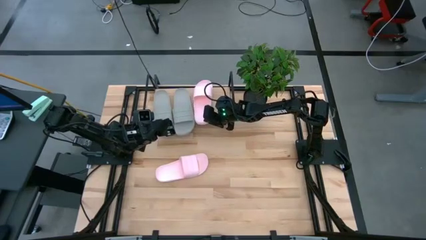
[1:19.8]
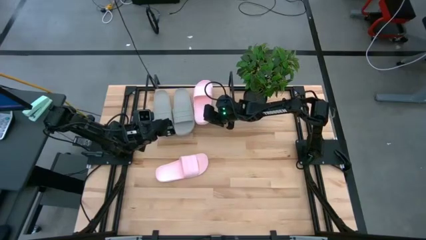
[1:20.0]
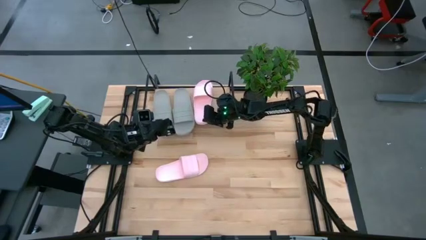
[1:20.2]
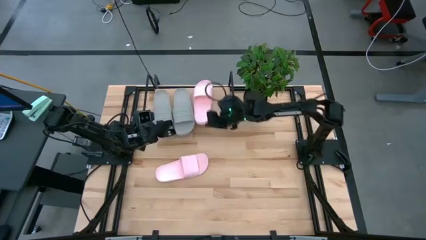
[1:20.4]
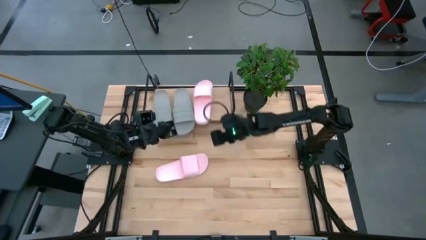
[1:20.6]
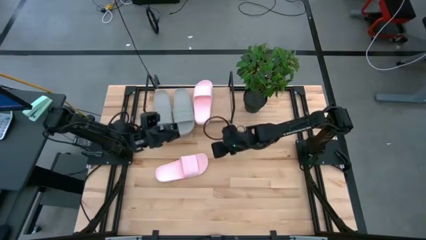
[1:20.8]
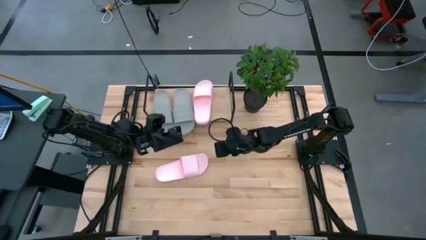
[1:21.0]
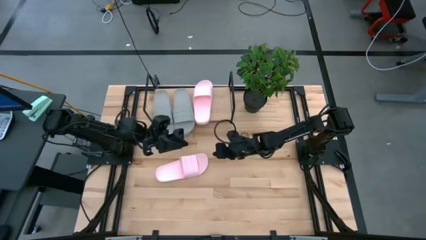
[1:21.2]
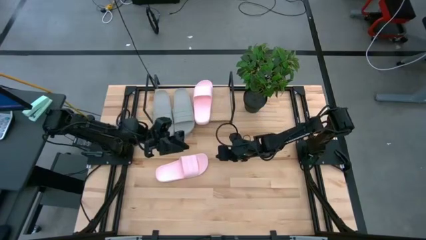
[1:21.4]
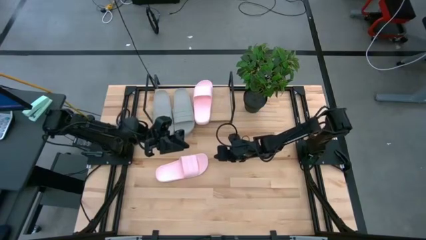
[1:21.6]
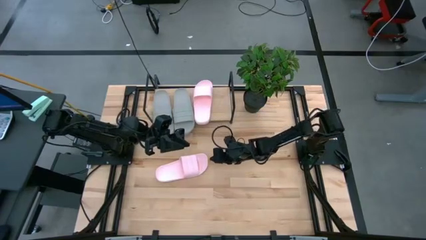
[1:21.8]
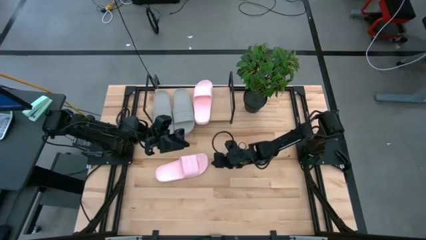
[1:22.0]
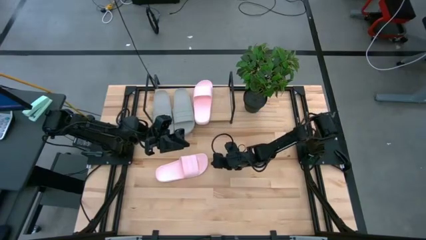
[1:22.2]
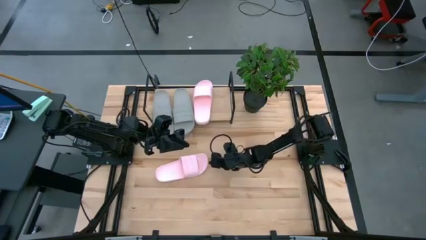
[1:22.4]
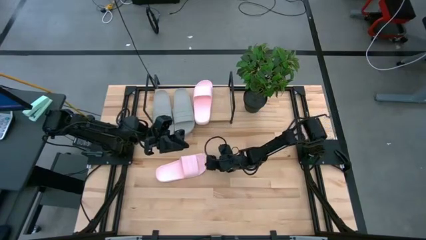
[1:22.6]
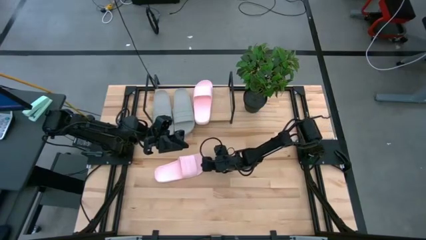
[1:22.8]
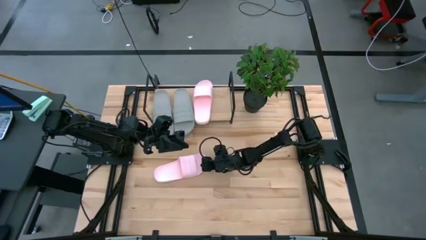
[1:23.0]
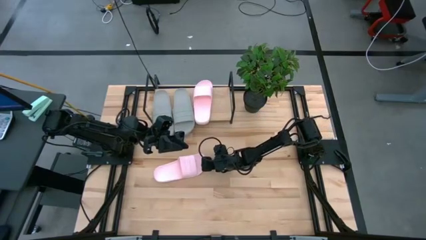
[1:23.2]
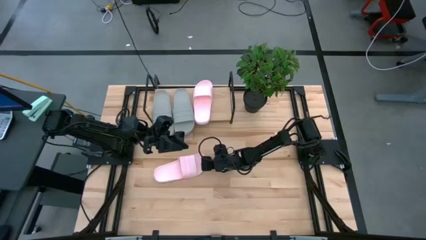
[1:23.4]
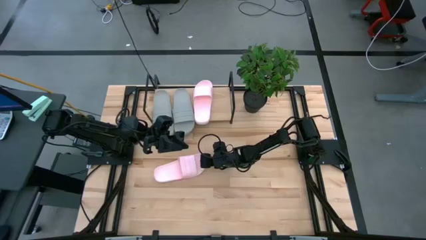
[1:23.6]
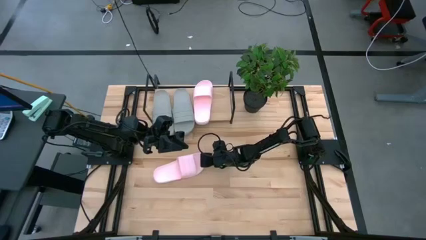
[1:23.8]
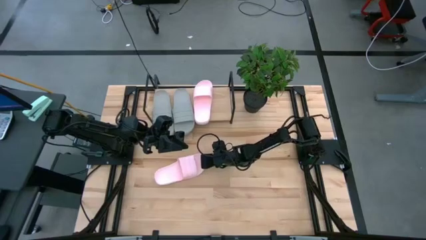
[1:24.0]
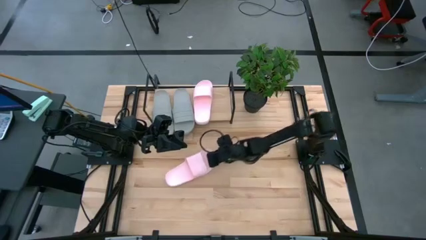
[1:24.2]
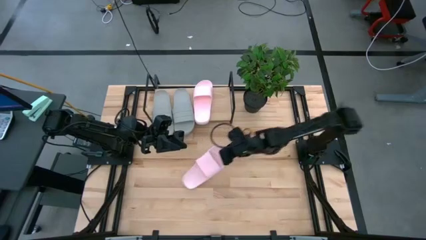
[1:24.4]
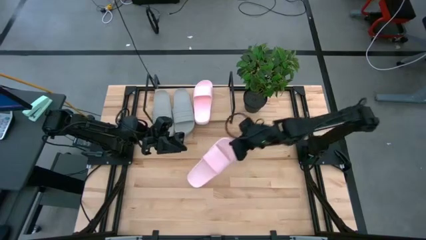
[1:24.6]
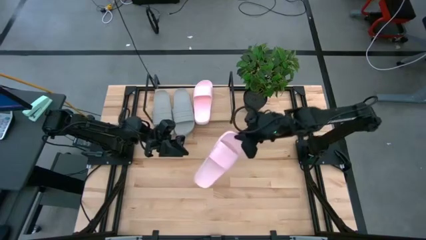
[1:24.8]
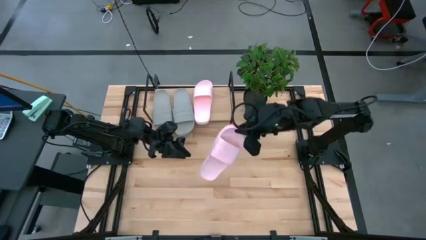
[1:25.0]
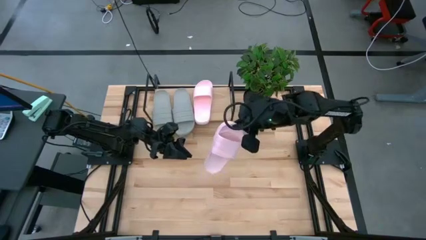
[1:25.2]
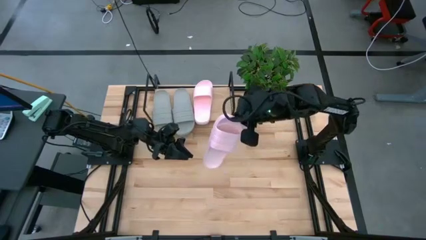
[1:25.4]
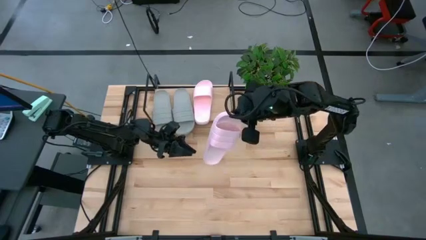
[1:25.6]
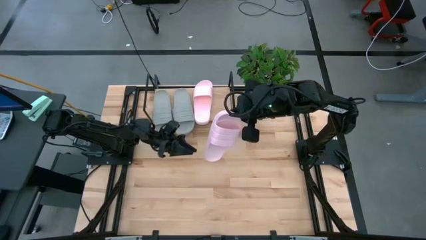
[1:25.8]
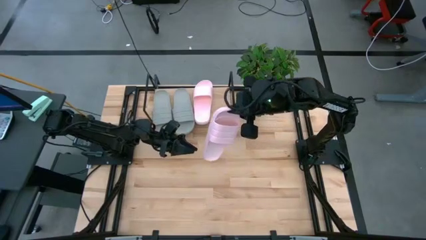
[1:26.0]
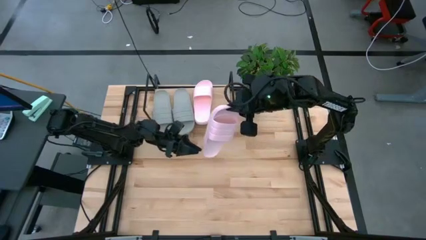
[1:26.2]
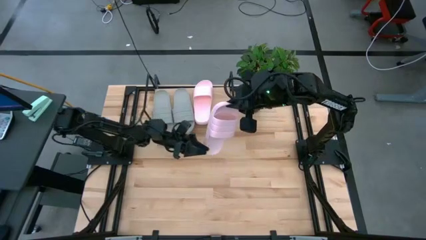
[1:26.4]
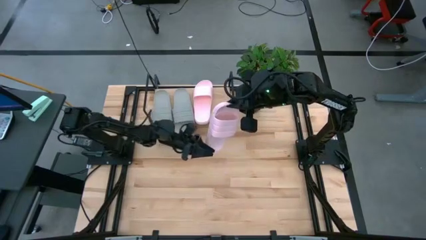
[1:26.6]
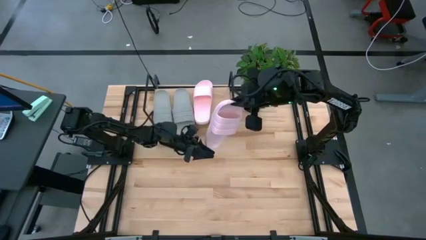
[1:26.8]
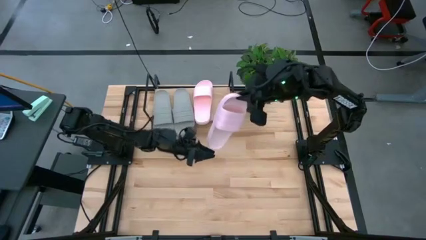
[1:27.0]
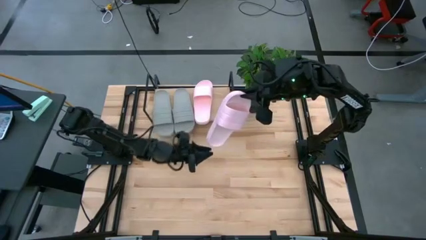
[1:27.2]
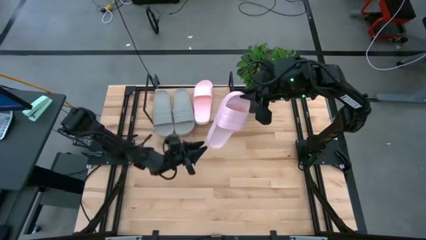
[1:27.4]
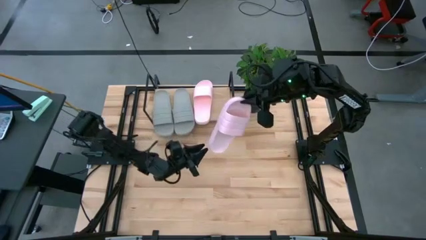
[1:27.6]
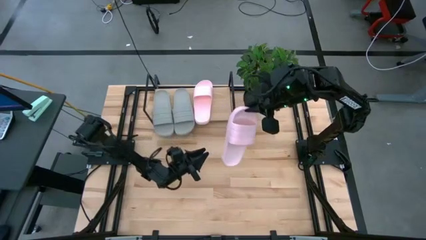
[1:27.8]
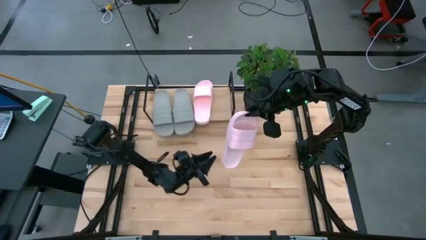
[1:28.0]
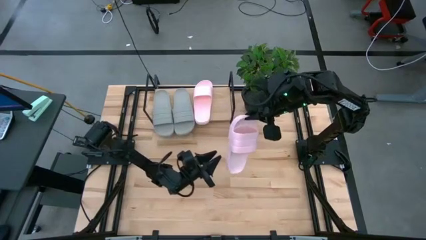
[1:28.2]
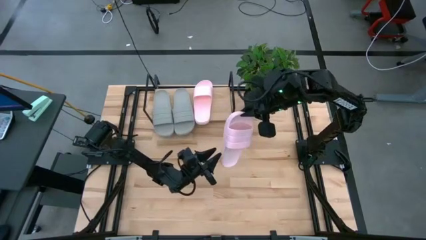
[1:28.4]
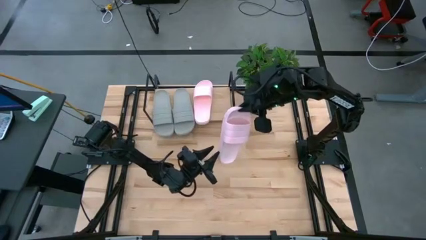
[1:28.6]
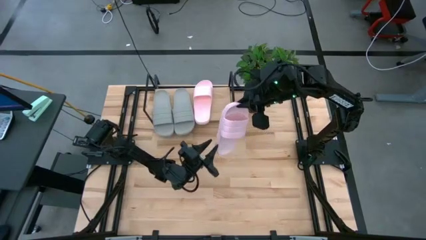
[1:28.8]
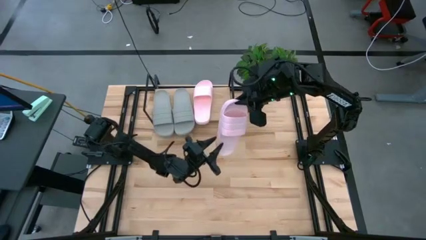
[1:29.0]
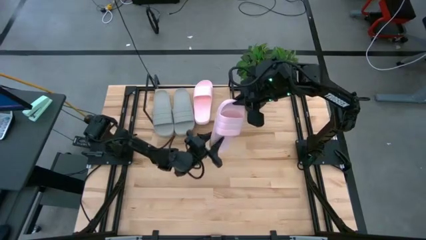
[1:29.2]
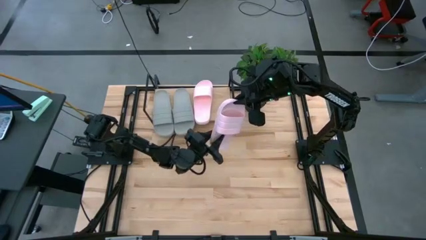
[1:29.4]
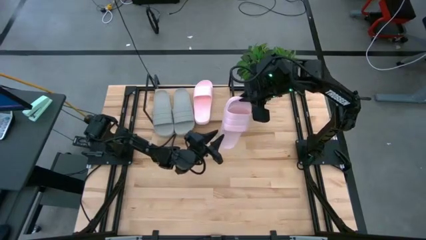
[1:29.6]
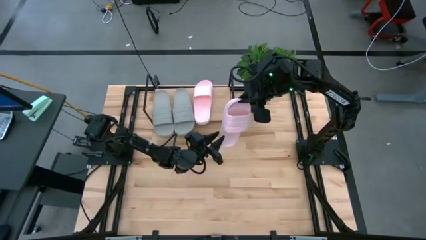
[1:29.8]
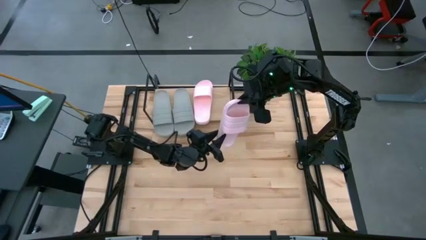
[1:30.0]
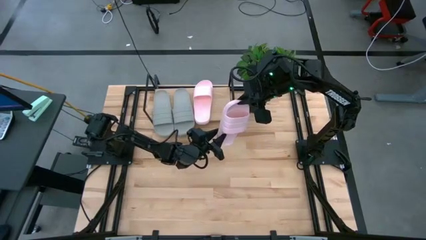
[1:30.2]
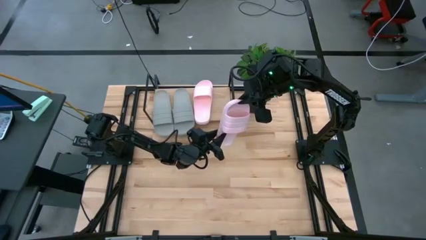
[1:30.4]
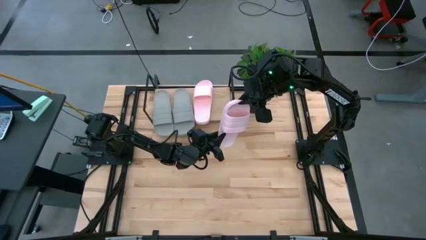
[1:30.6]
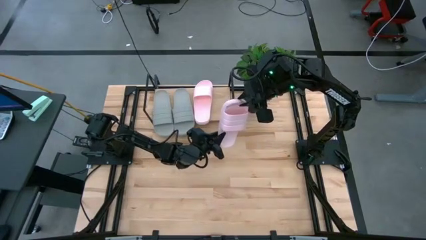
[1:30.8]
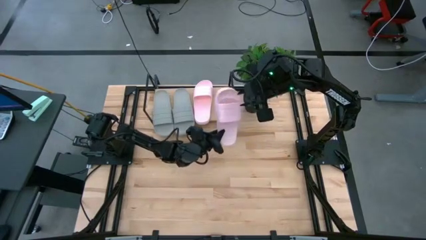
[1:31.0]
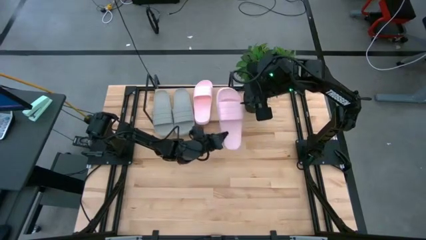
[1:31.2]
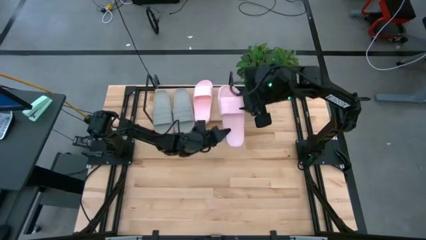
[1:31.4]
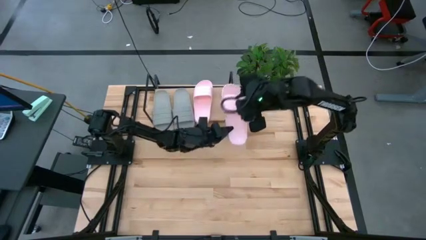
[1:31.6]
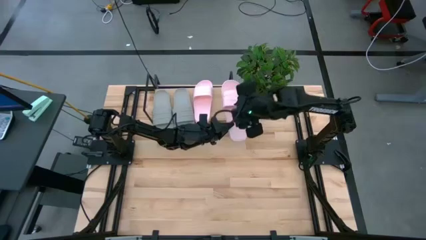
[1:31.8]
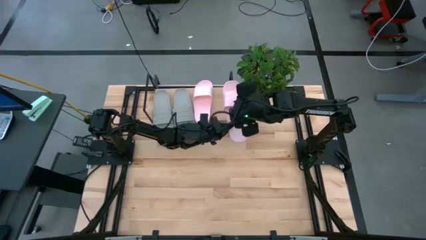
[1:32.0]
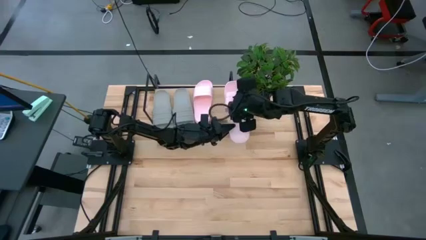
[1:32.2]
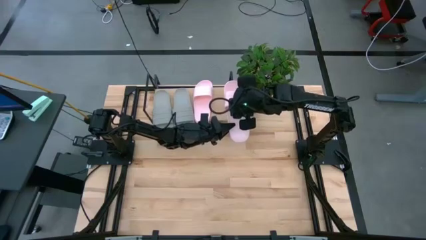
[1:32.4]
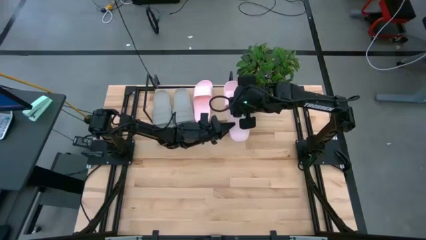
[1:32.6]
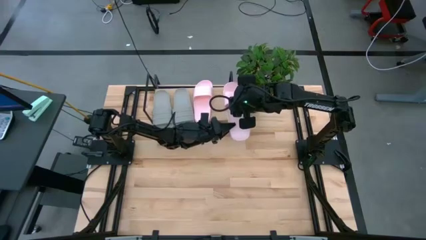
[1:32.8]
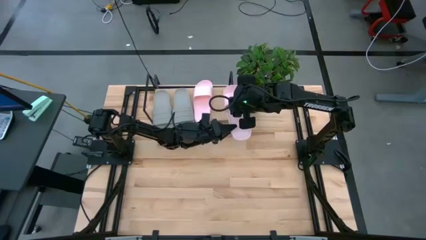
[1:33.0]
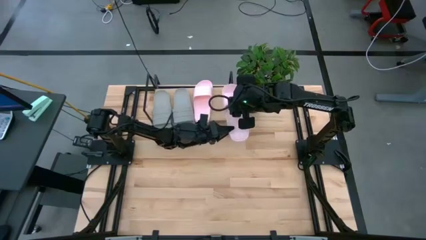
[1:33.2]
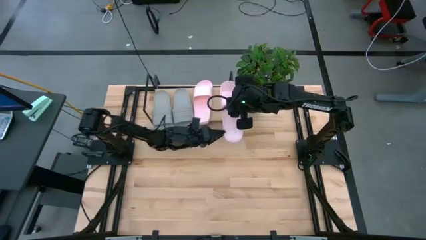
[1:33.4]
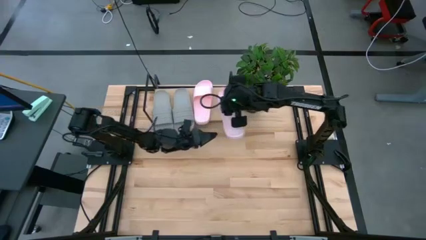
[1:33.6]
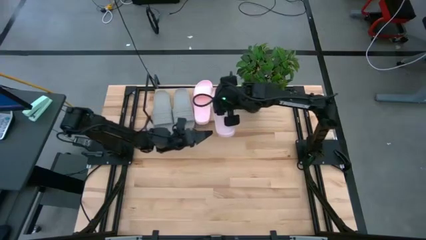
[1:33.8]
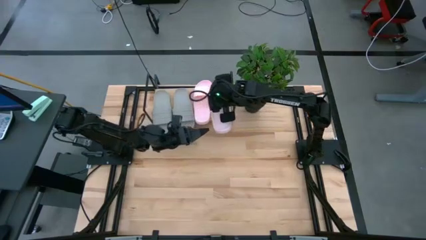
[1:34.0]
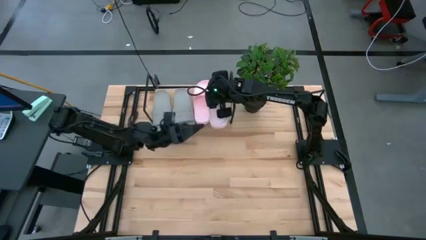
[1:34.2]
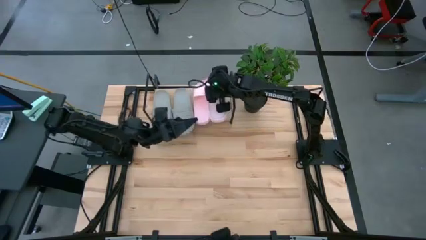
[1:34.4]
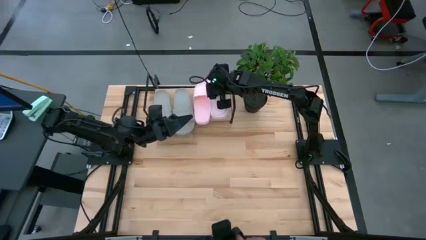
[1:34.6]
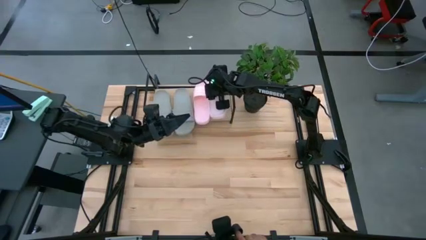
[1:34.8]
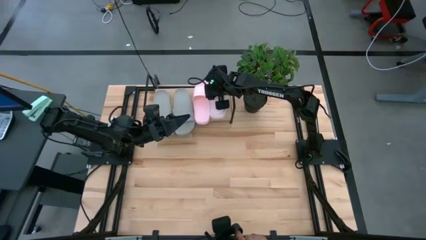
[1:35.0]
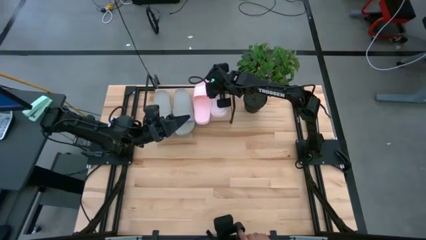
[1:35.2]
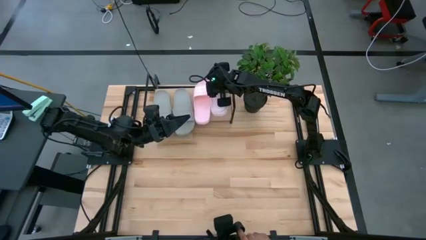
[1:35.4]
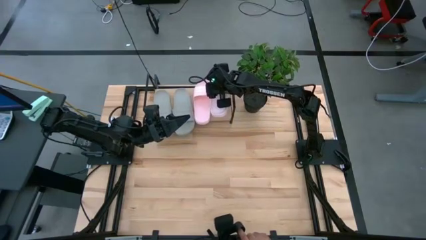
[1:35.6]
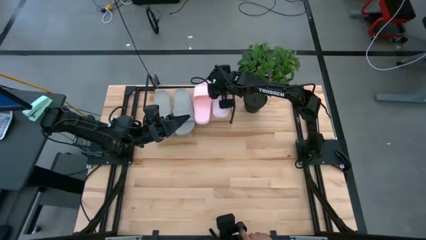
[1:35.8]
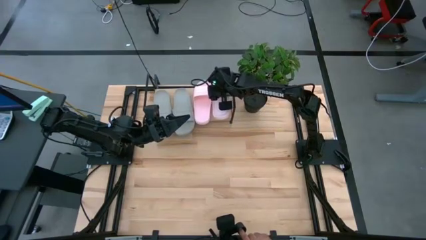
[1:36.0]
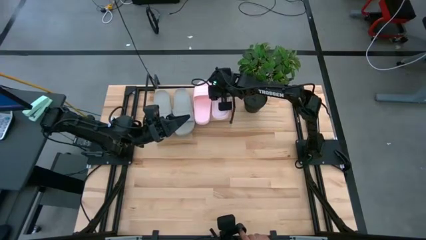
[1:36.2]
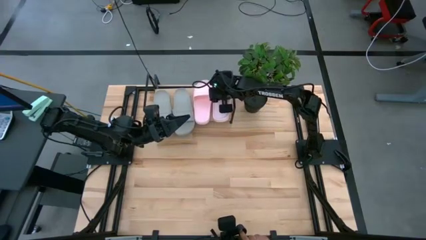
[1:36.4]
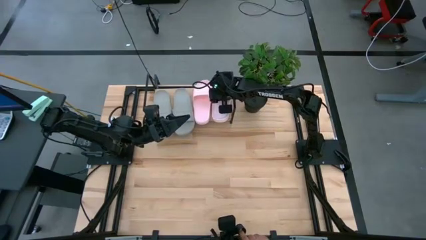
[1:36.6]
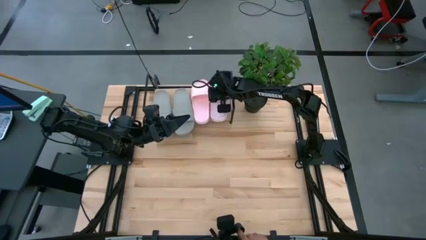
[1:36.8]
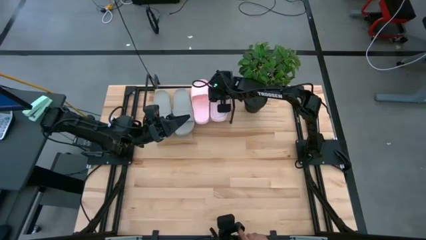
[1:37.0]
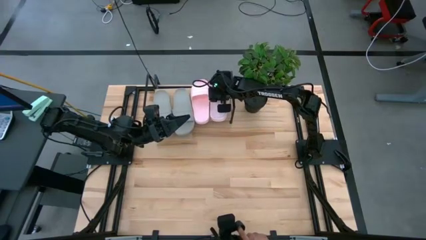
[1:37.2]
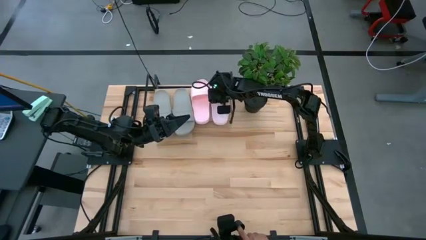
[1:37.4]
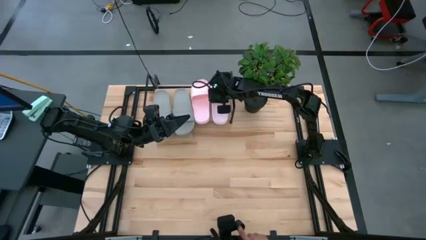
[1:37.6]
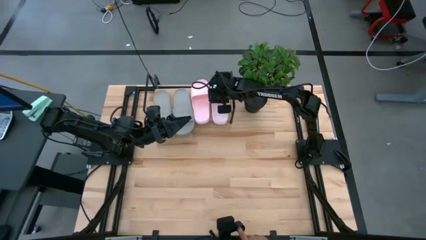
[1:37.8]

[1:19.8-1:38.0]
Task: Pick and place slides into the shelf
Put the pink slide on the shelf
